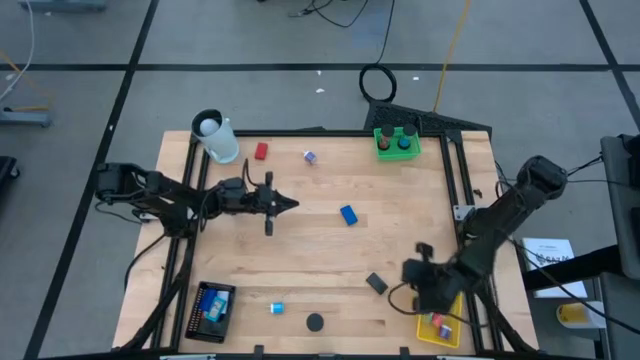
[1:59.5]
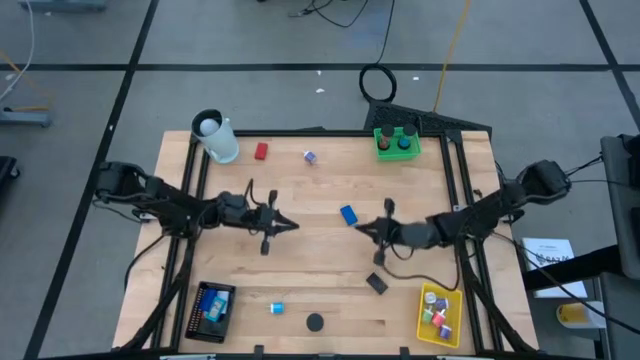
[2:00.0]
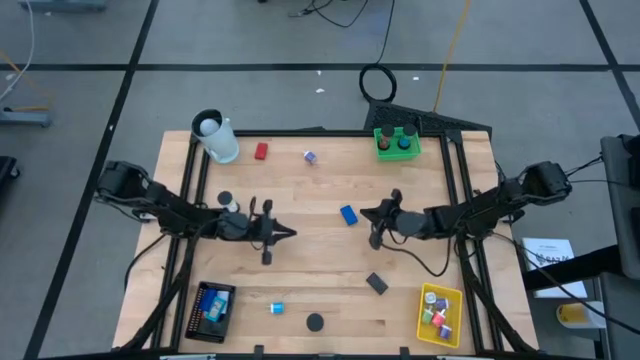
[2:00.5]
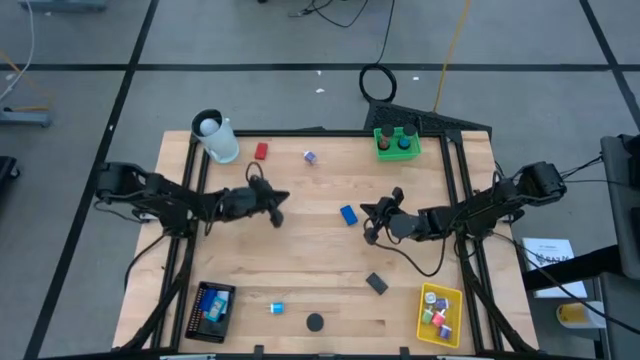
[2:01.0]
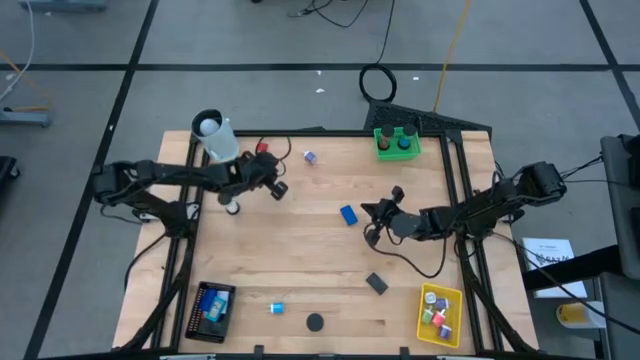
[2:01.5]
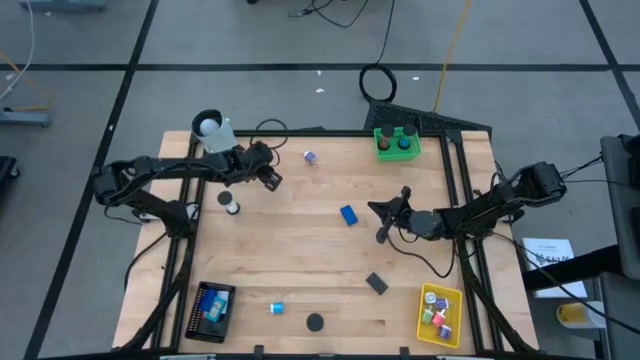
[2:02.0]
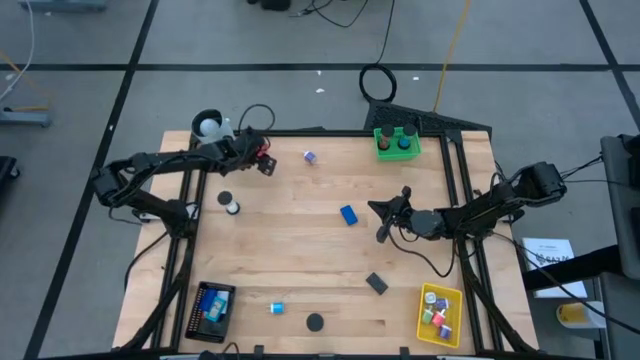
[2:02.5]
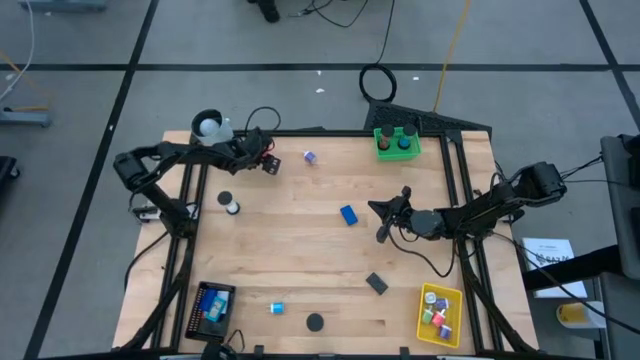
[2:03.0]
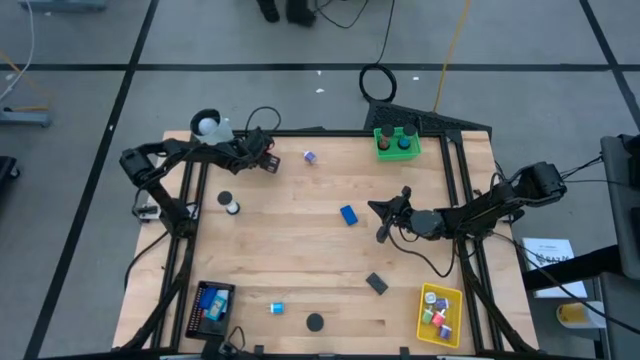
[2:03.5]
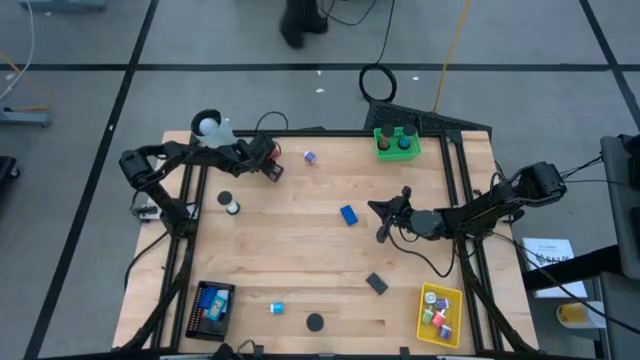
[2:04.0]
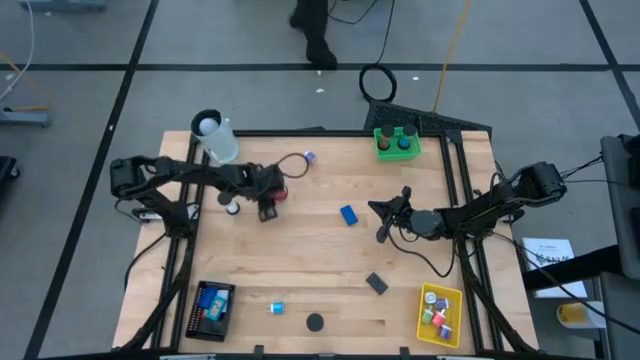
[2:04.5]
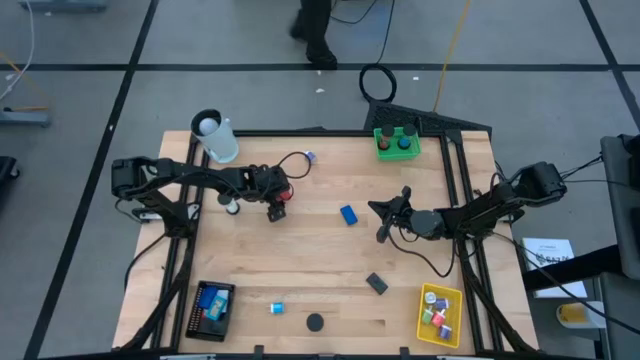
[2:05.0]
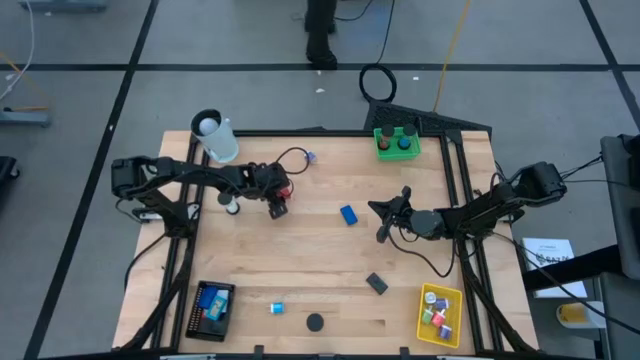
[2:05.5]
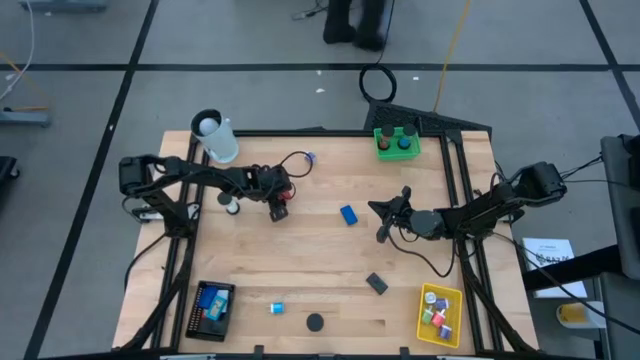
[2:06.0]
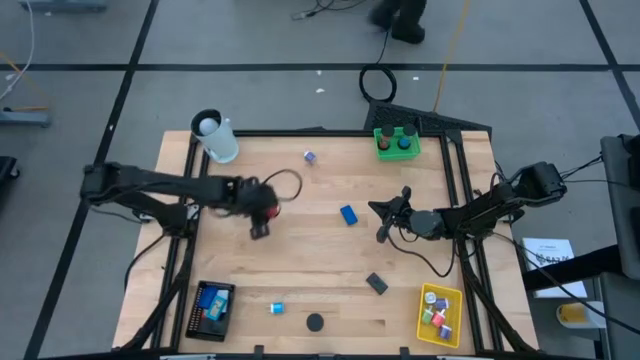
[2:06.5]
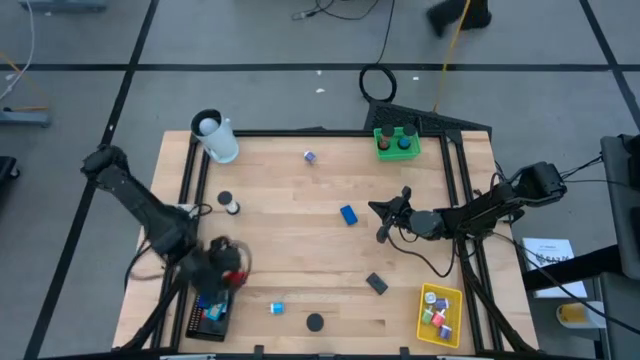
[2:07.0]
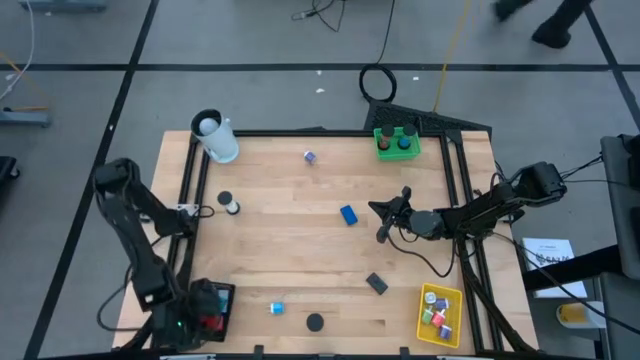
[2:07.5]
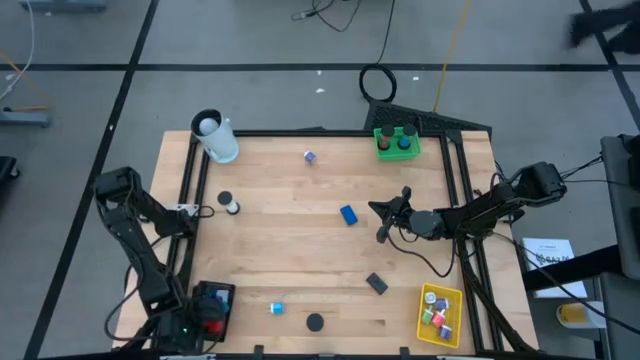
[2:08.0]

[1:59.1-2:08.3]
Task: Pick & Place Office items
Put the red digital clock into the black bin

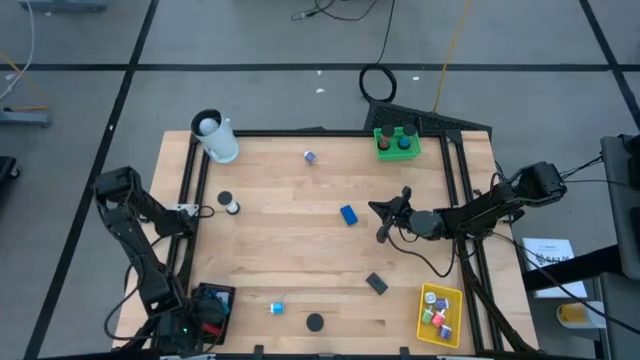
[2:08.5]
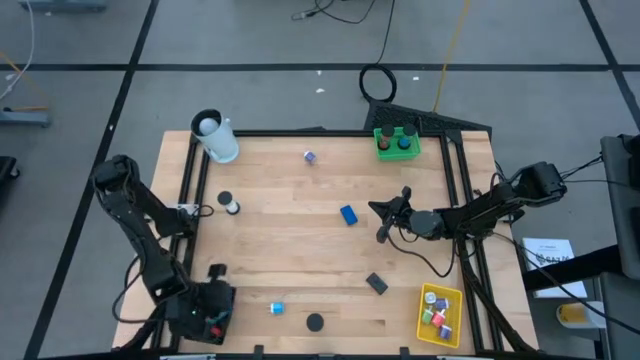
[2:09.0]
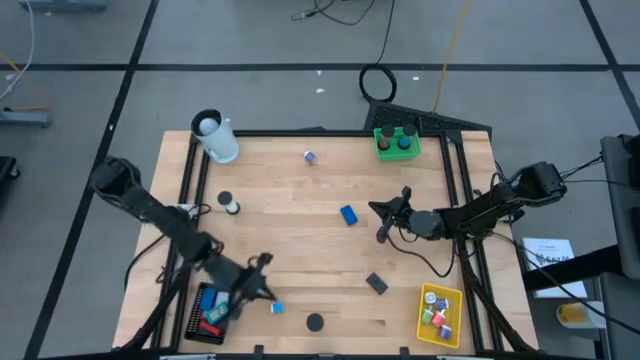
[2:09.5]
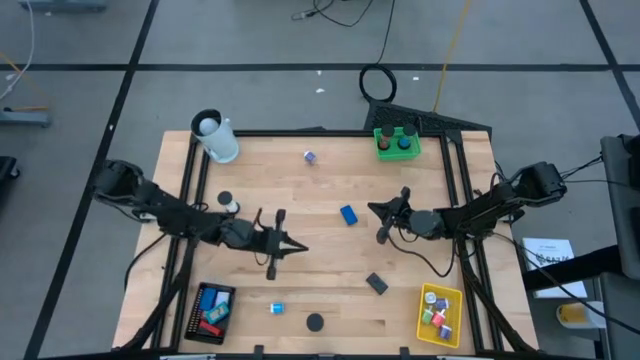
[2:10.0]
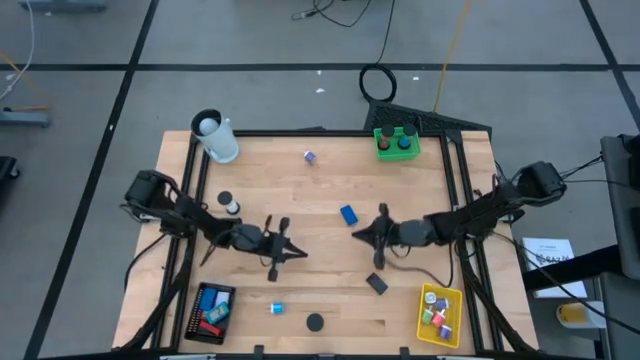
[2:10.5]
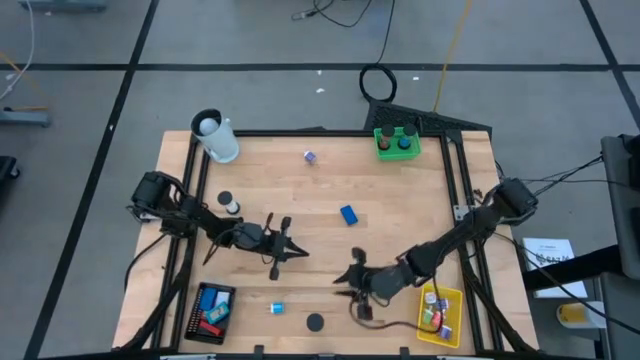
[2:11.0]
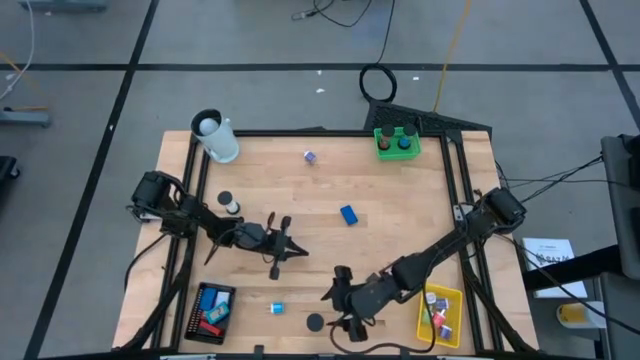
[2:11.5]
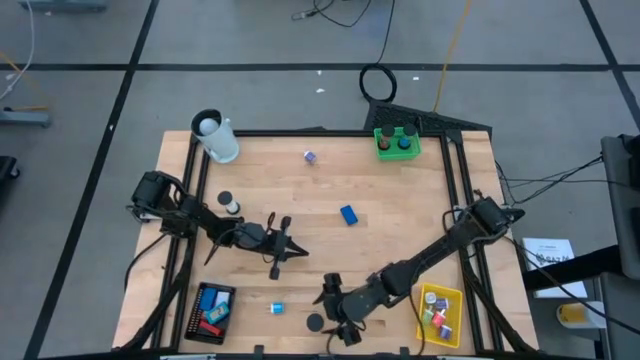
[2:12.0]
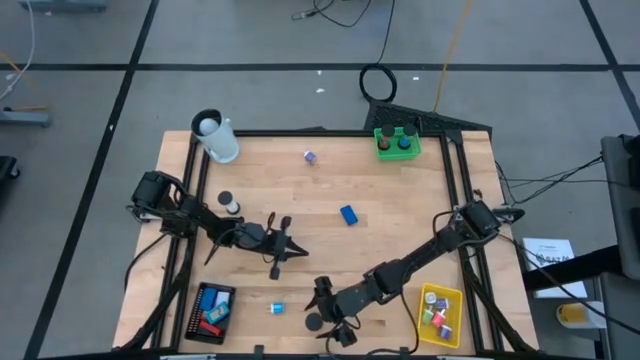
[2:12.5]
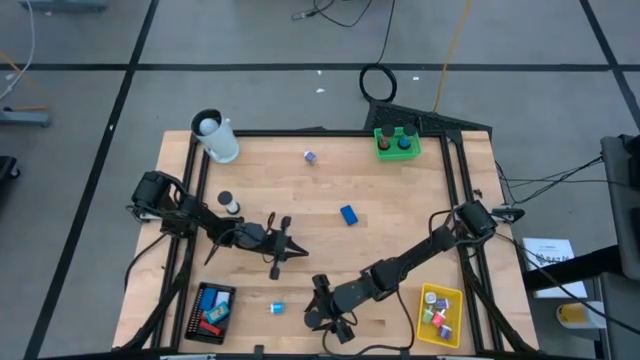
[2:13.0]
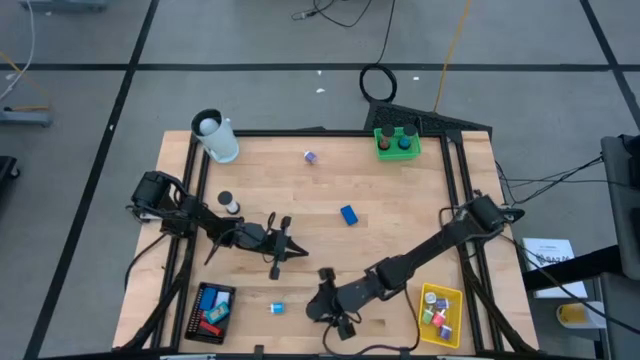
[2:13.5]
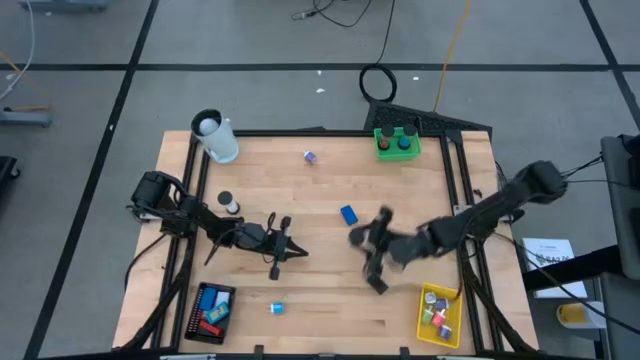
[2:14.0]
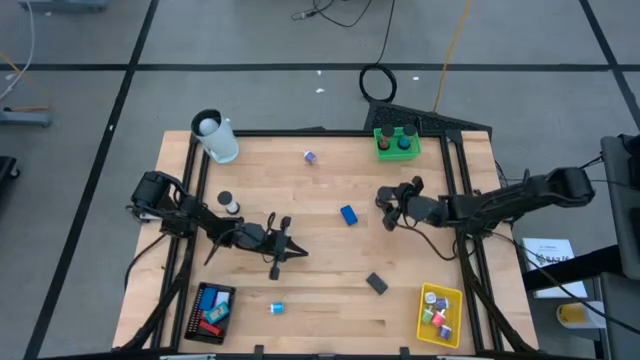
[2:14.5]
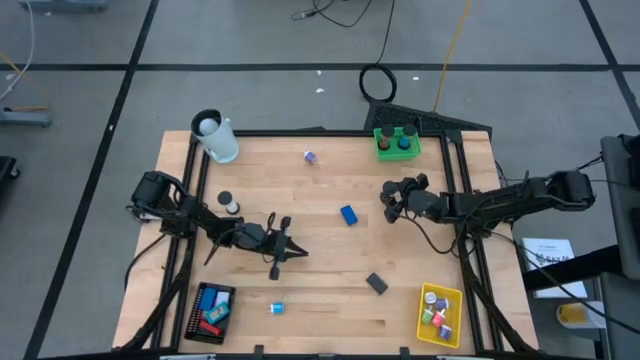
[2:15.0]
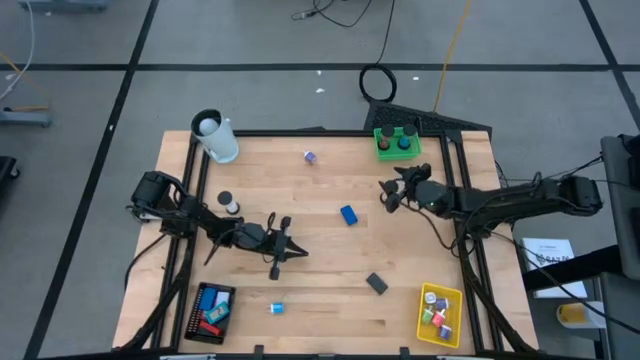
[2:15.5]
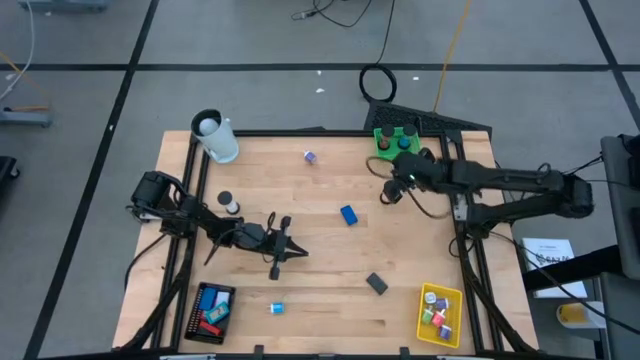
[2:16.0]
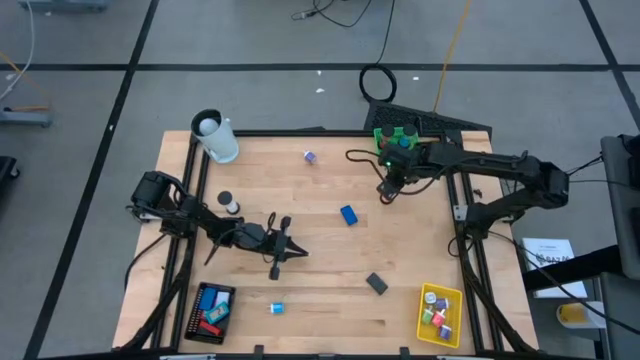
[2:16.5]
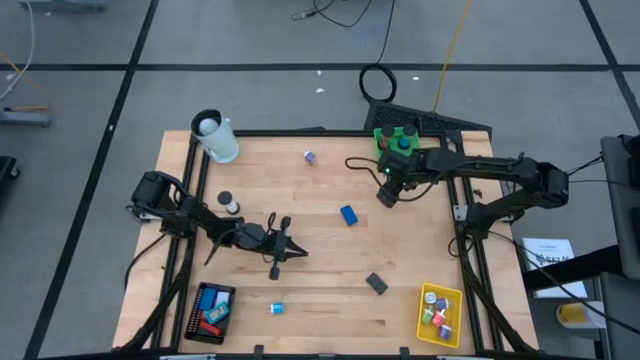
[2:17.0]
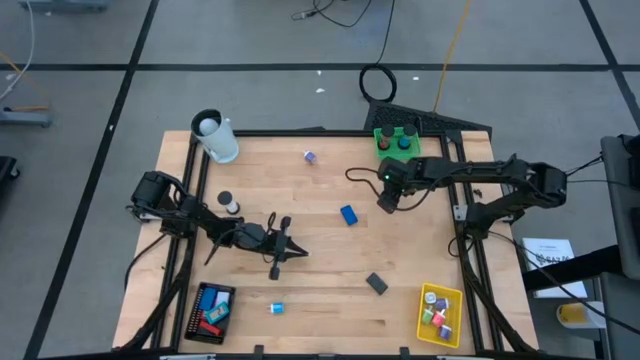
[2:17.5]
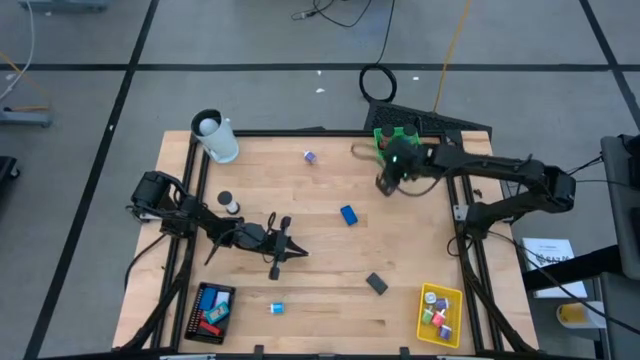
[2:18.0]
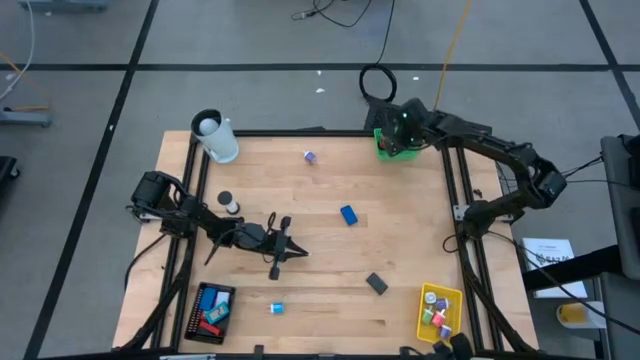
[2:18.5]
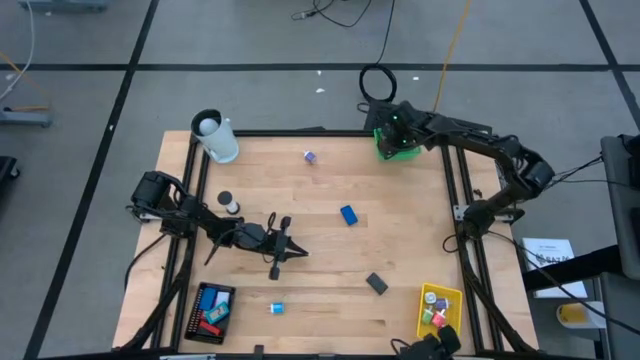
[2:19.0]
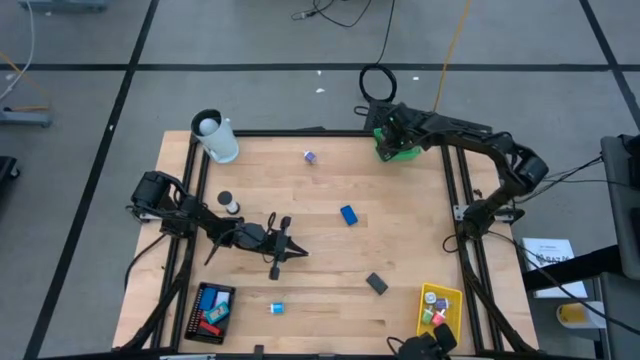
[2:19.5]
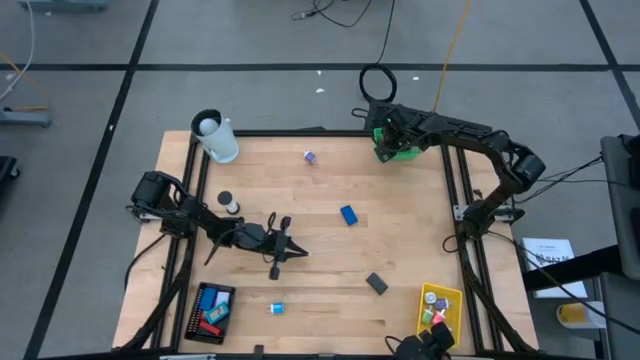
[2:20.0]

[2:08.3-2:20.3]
Put the orange hourglass into the green bin

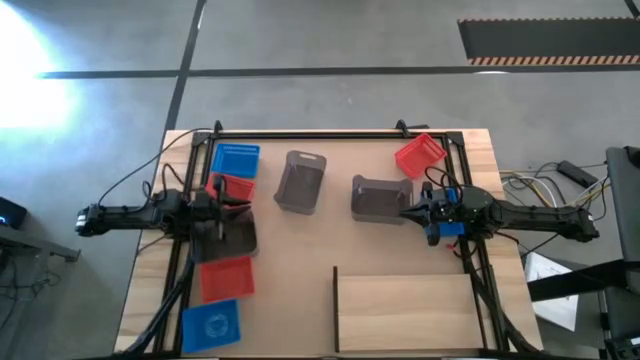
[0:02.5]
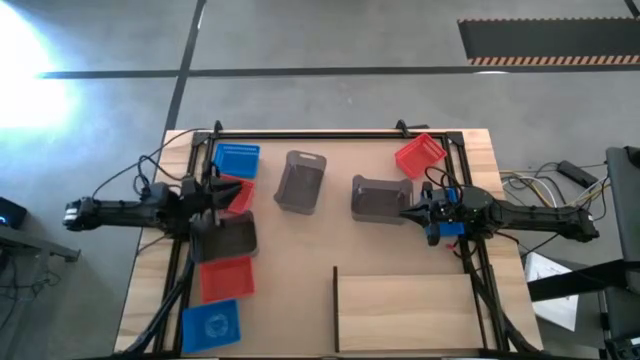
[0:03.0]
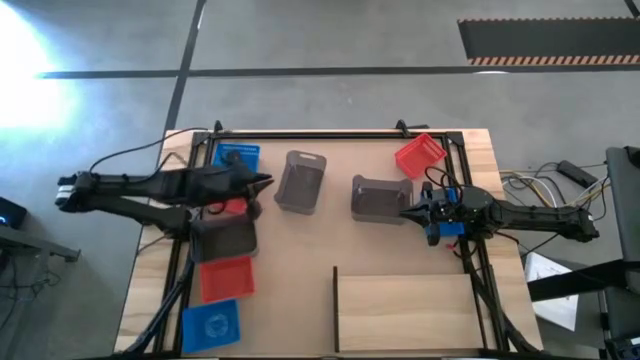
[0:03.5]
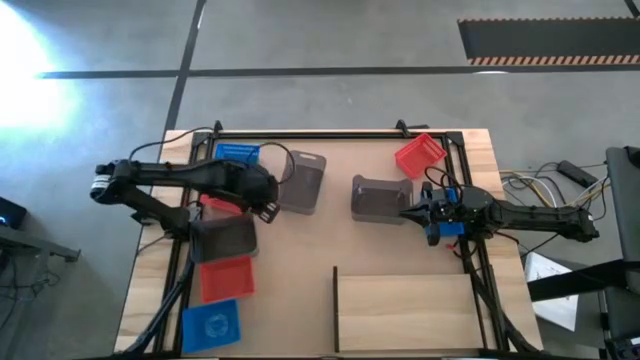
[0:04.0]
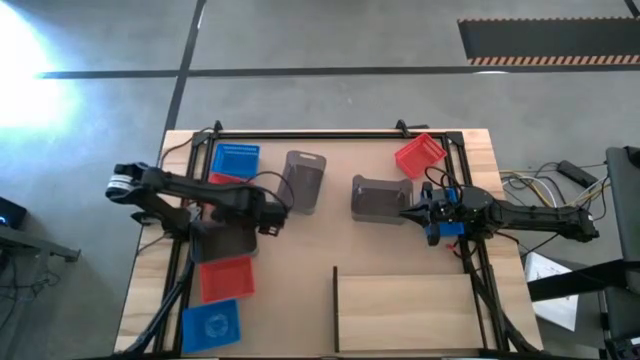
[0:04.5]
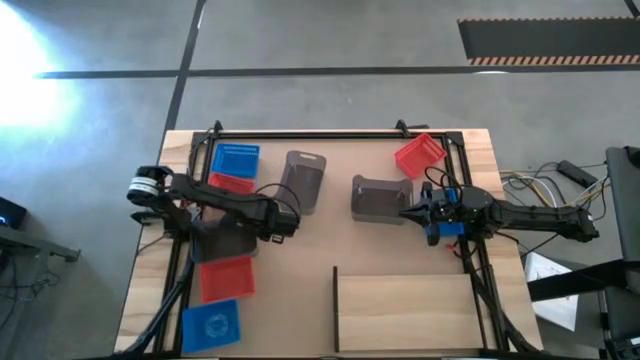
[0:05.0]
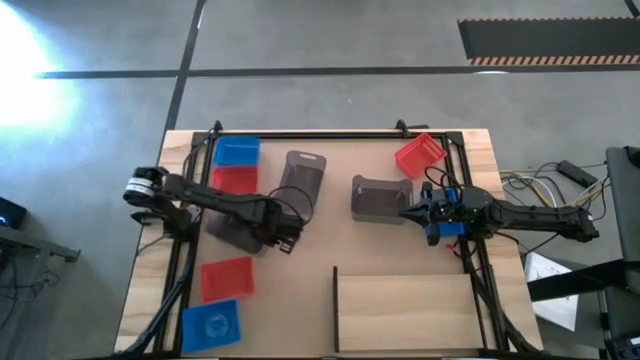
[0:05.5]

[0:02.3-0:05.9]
Task: Stack baskets on shelf by color
Put the left black bin on the shelf
